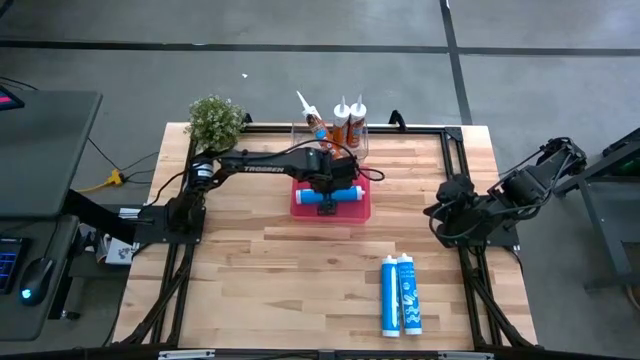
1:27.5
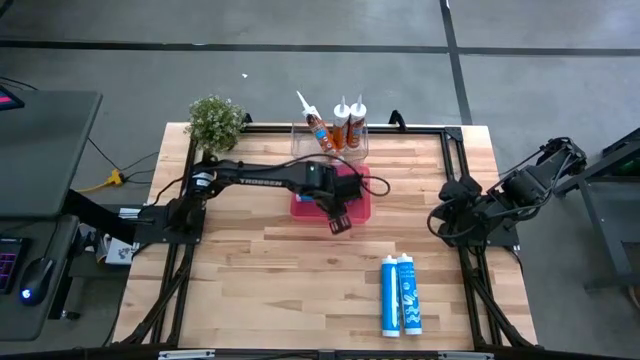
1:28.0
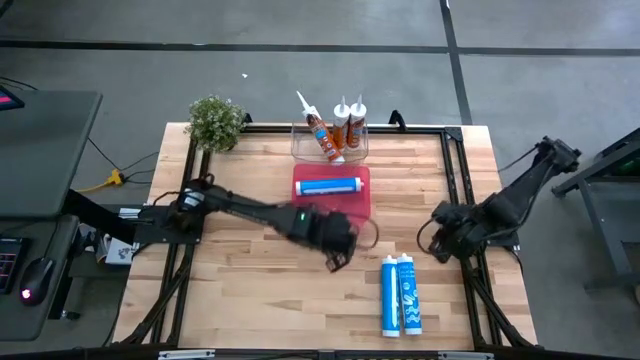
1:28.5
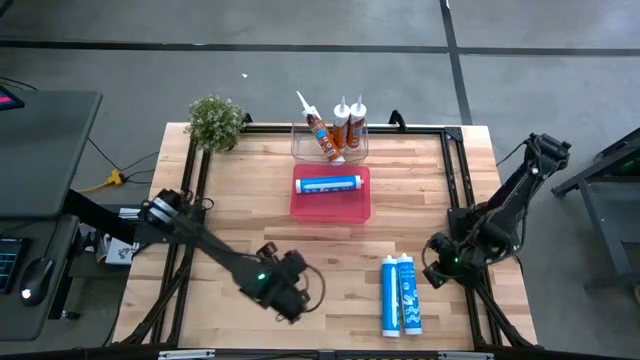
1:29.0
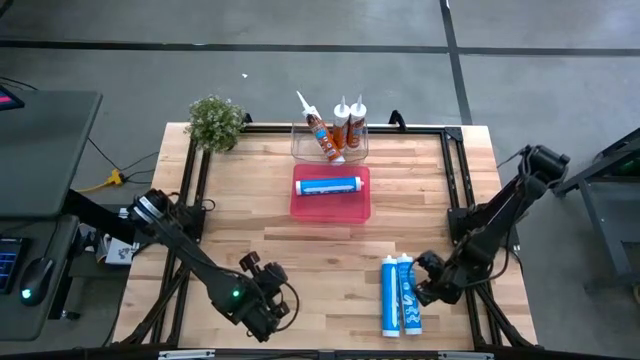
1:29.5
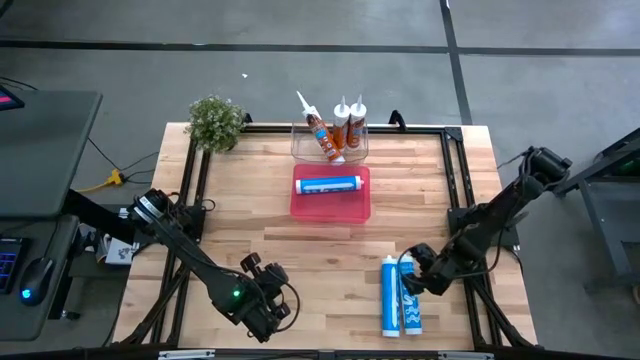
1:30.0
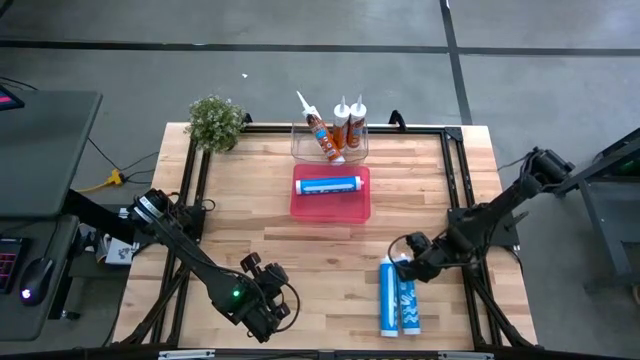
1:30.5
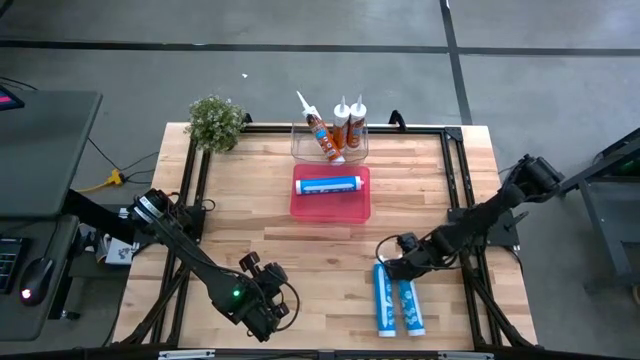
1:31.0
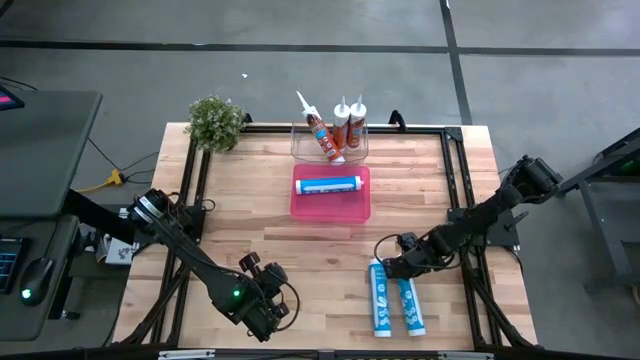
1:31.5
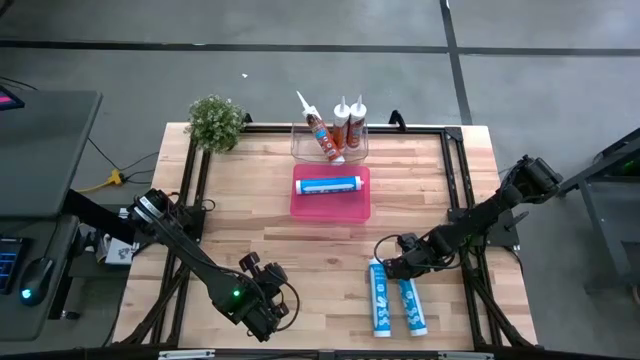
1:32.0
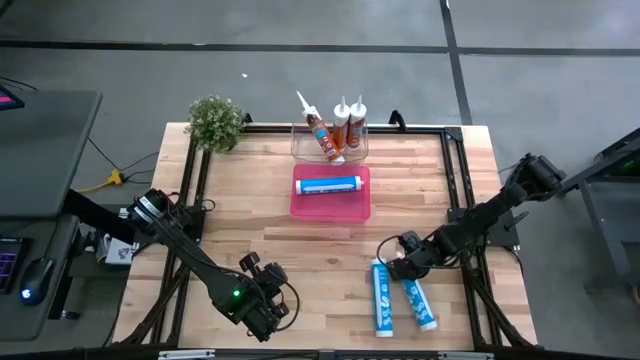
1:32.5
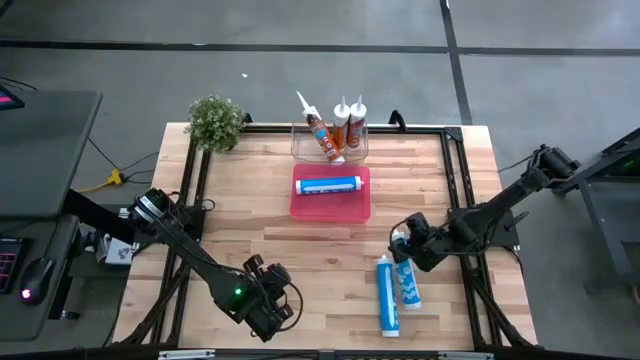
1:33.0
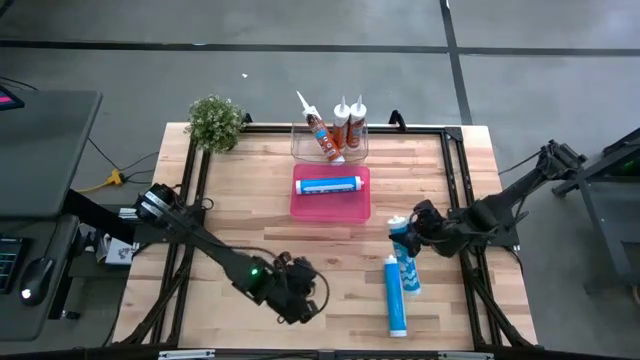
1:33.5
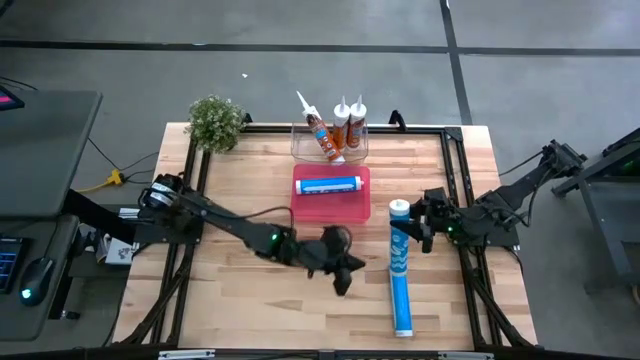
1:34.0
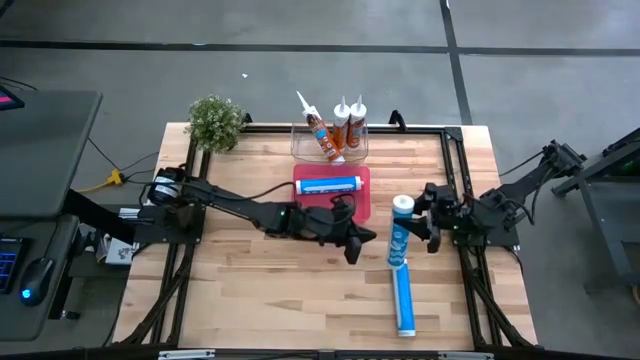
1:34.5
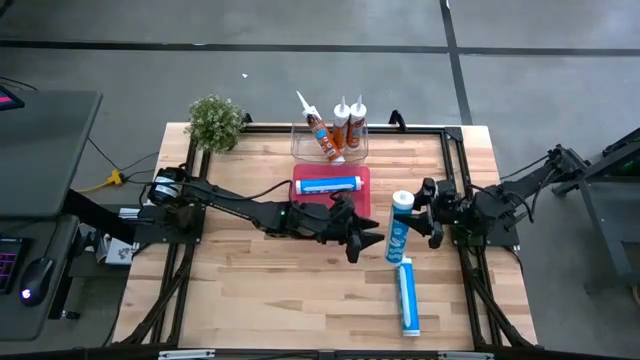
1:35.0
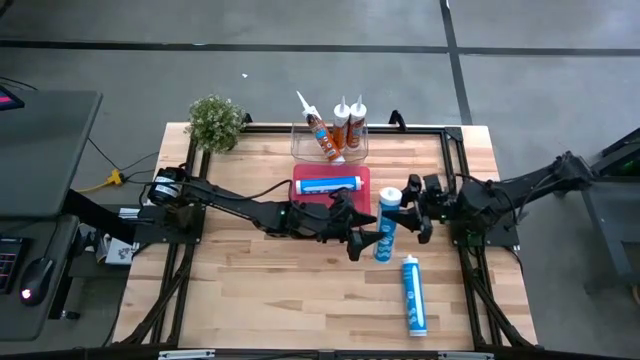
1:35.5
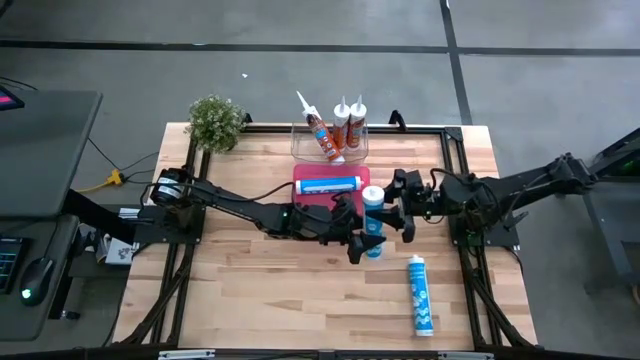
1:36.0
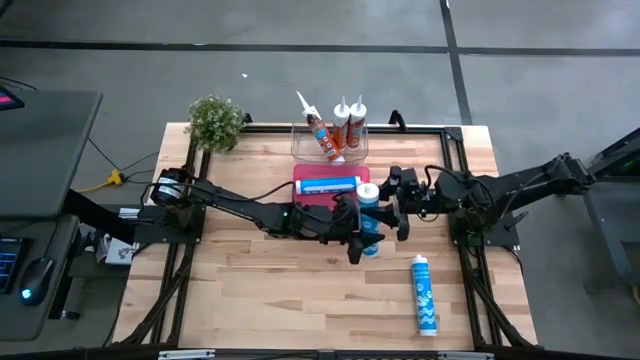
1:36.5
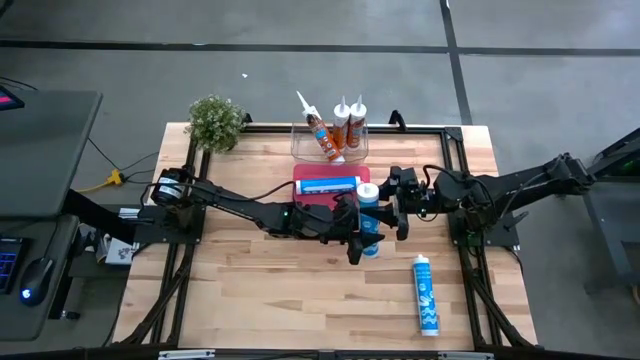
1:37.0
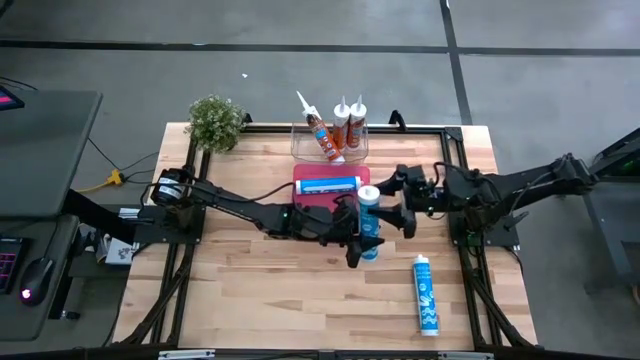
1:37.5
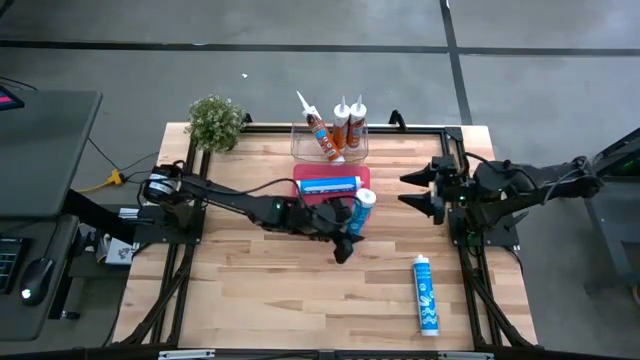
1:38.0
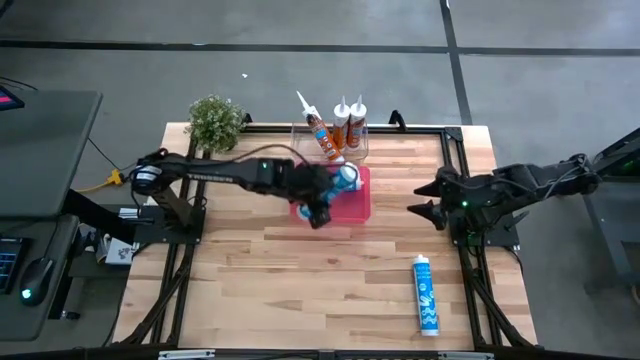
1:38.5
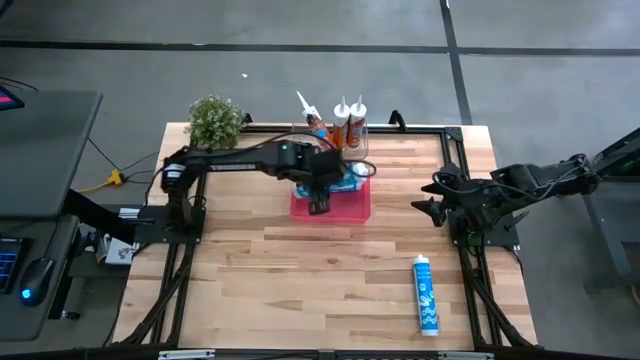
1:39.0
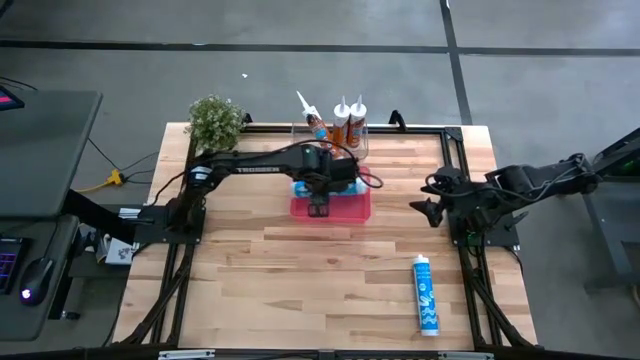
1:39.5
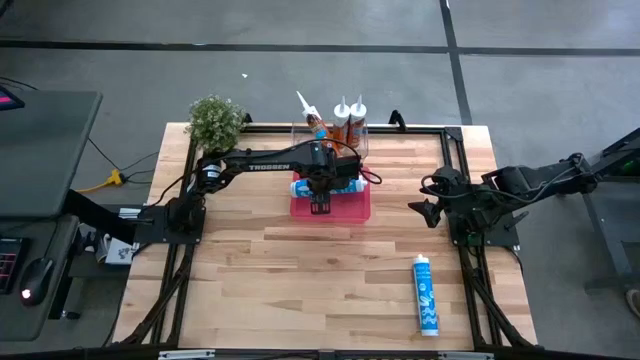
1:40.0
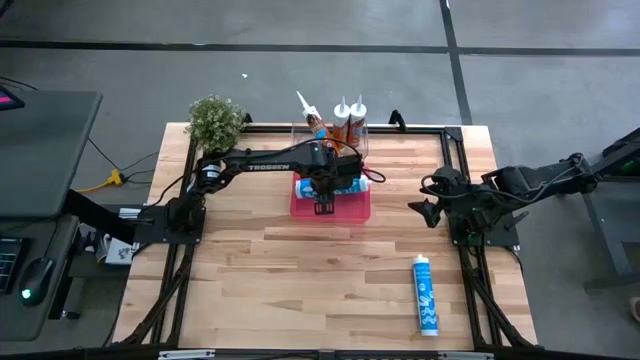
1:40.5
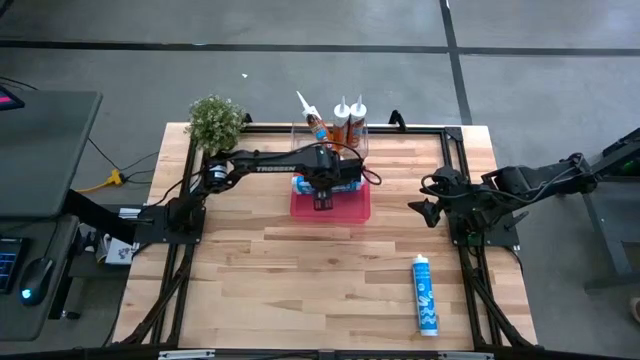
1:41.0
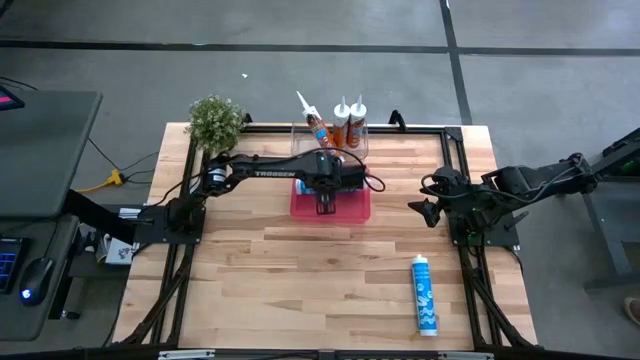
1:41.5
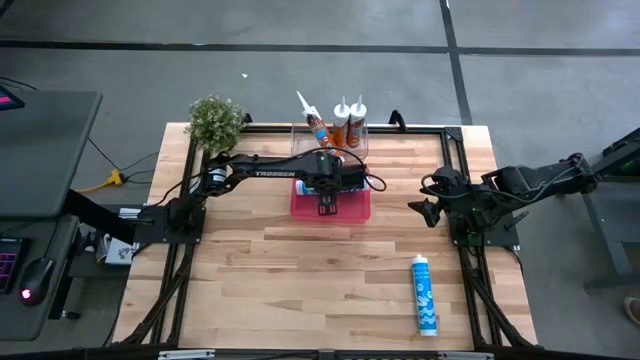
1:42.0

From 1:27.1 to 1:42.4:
Task: Pick & place silicon tubes, Sealant and Lysol wipes
Put the right blue sealant into the red container

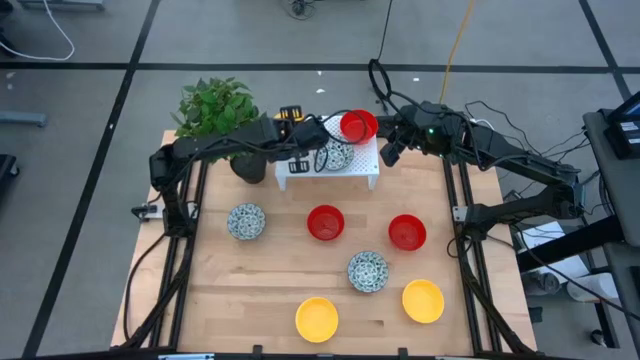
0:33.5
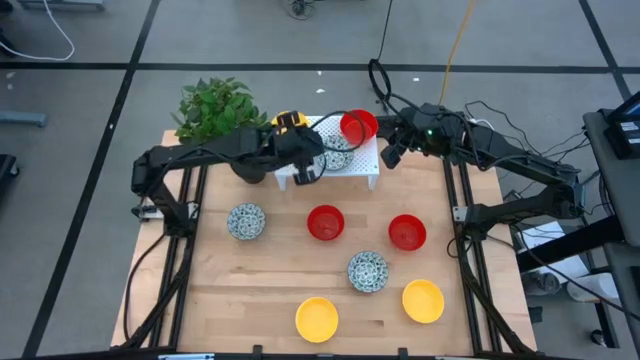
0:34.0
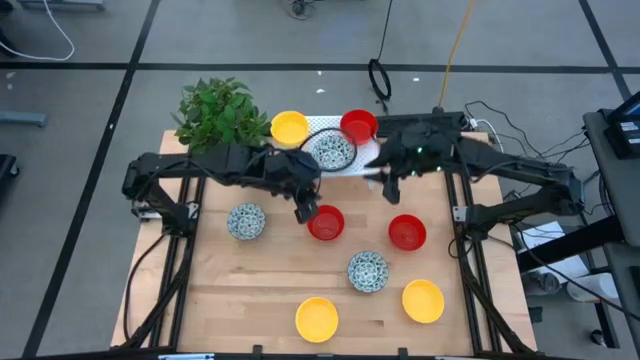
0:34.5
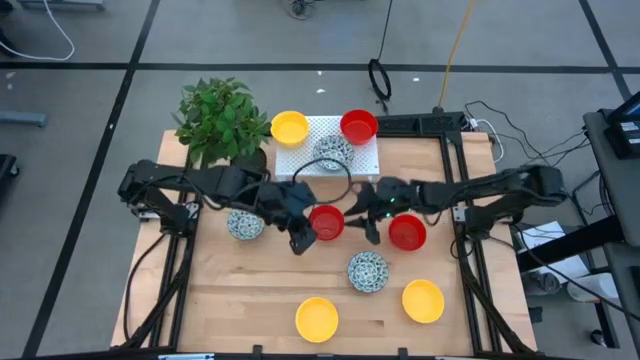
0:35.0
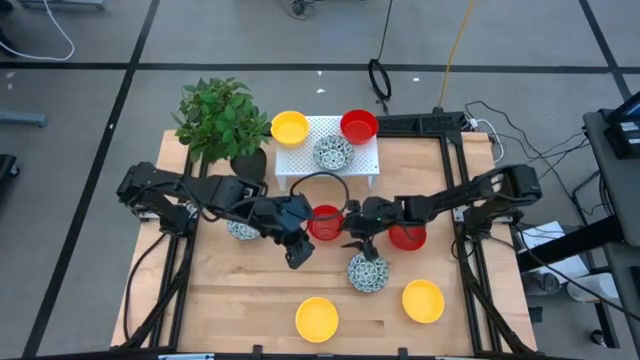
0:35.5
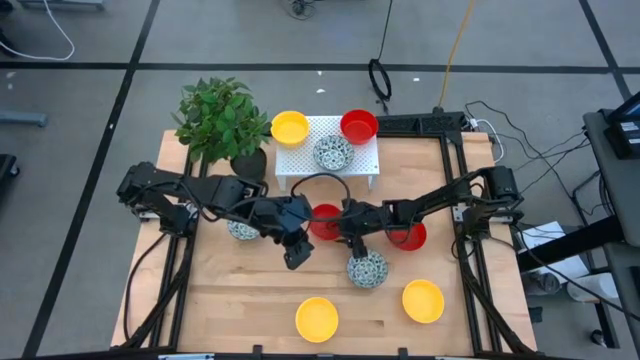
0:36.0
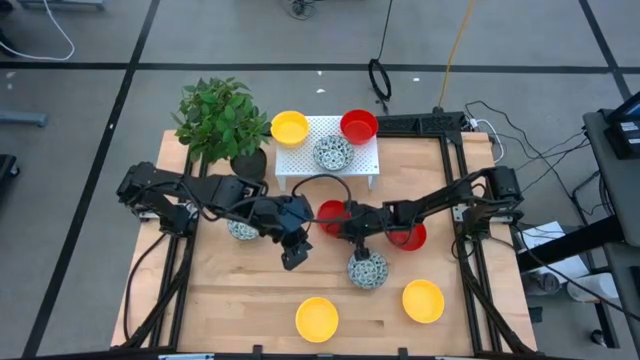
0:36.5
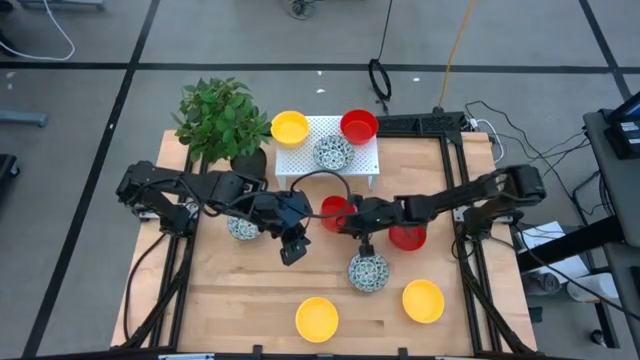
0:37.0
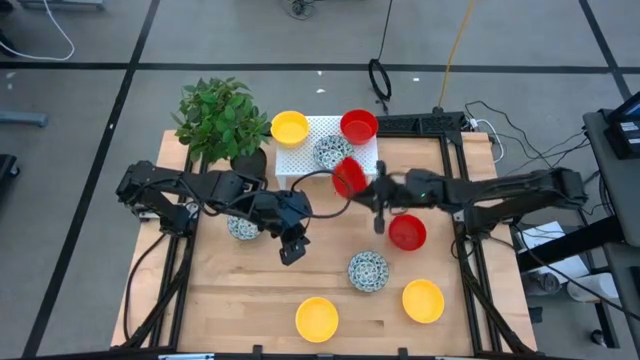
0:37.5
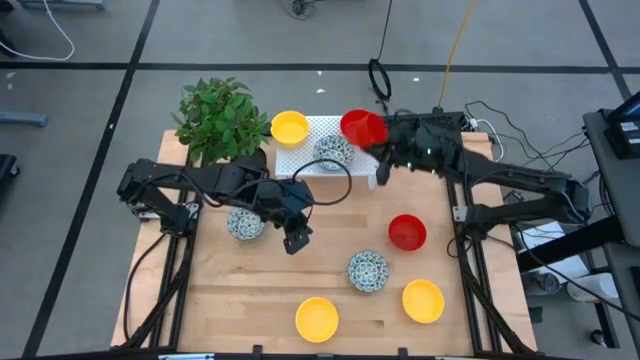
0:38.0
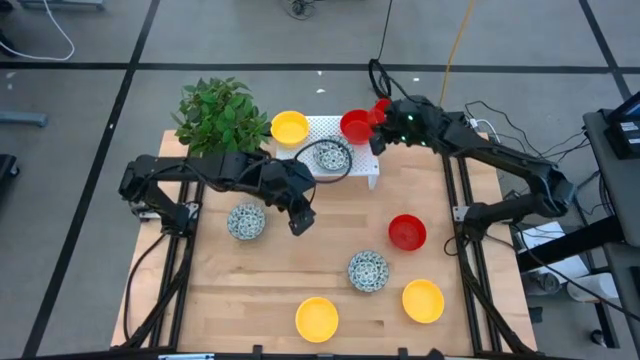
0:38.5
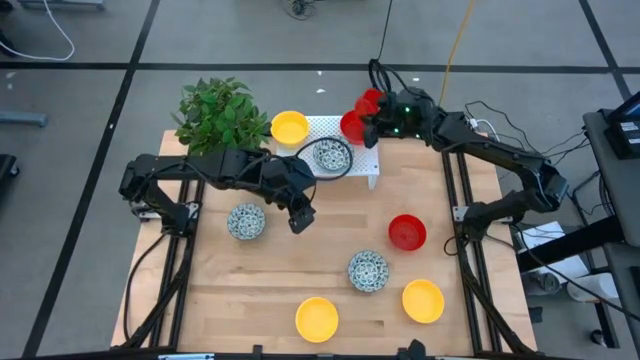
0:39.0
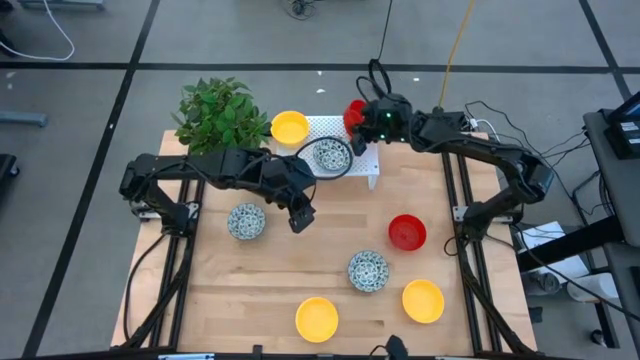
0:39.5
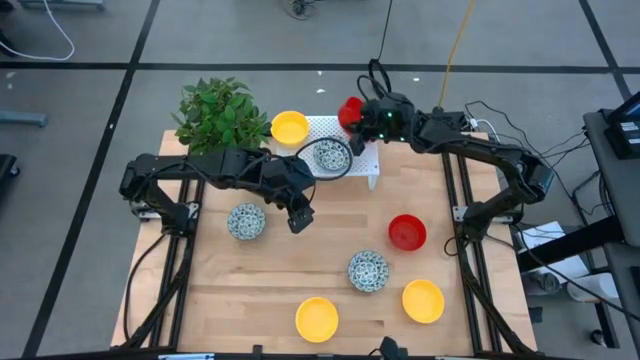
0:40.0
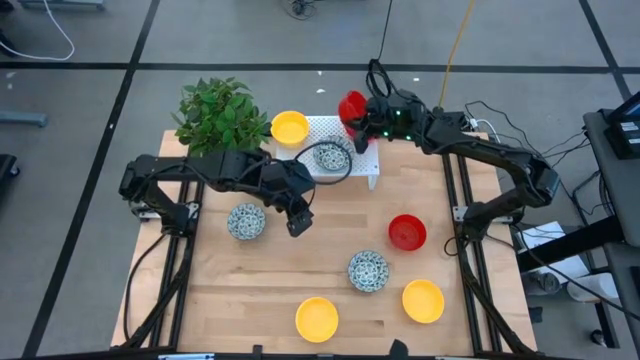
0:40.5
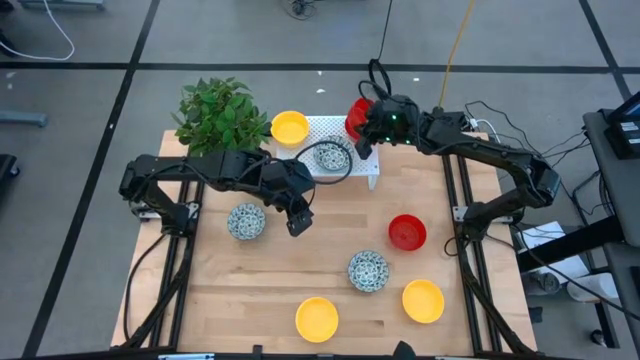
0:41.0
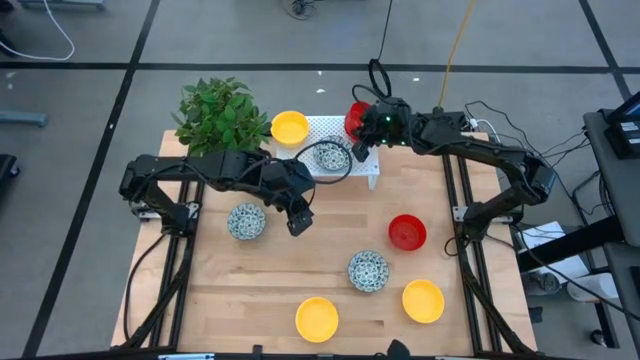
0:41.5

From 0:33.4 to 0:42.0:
Task: Pick & Place Mini bowls
Stack the left red bowl on the red bowl on the shelf
